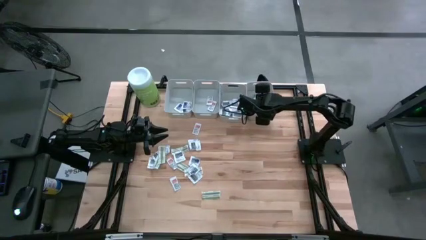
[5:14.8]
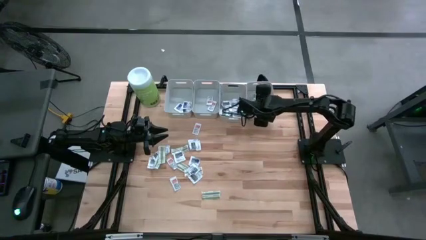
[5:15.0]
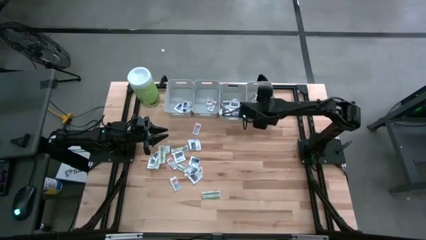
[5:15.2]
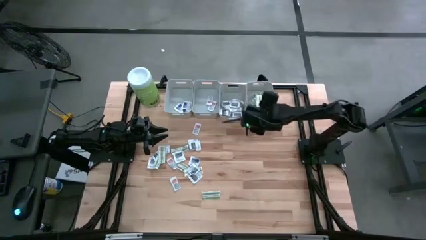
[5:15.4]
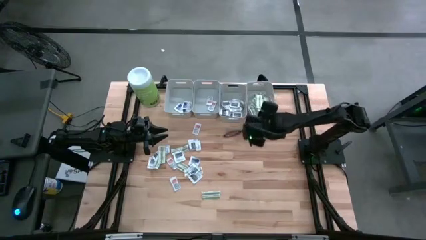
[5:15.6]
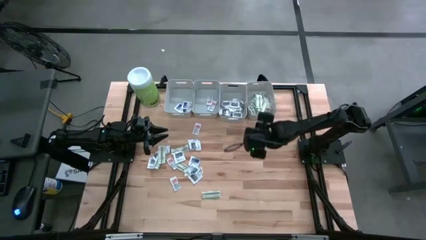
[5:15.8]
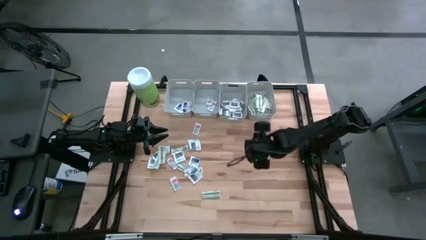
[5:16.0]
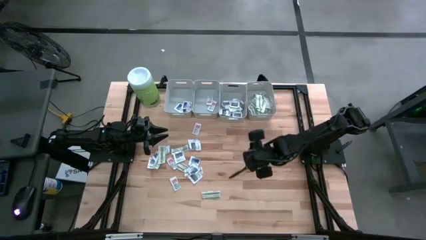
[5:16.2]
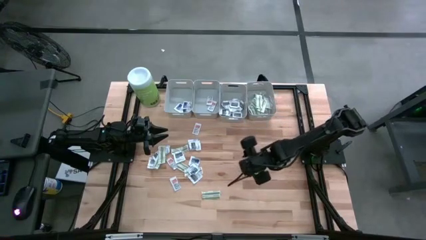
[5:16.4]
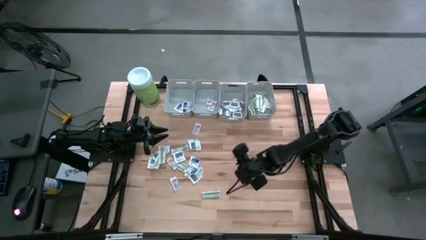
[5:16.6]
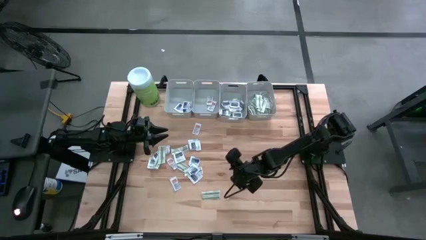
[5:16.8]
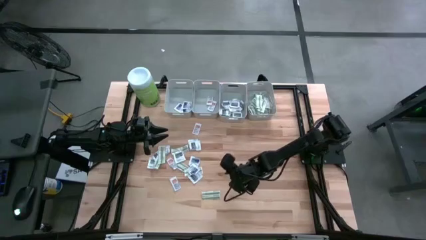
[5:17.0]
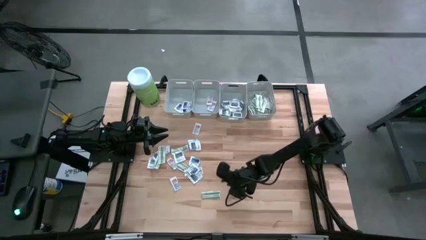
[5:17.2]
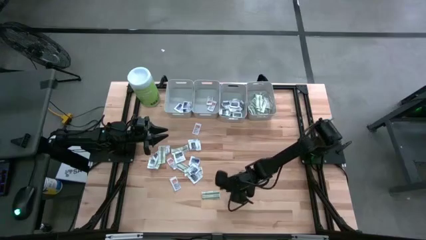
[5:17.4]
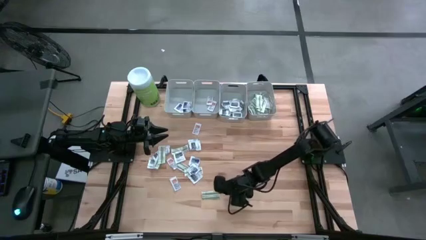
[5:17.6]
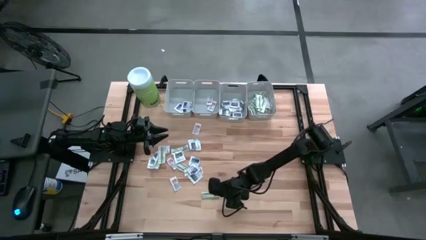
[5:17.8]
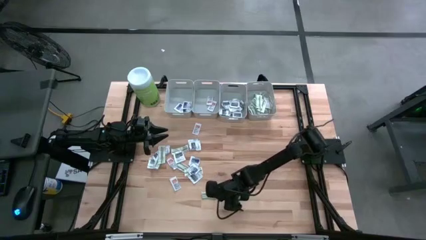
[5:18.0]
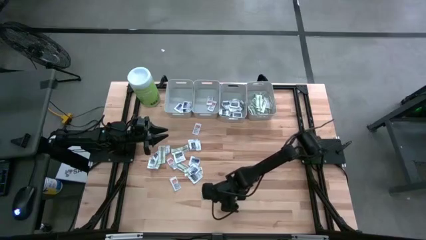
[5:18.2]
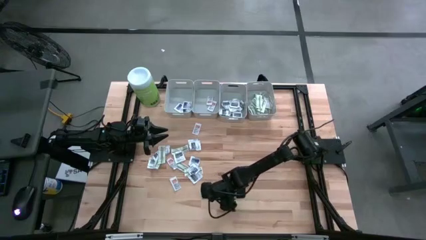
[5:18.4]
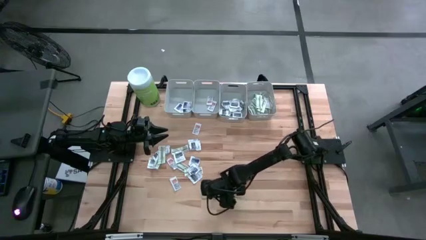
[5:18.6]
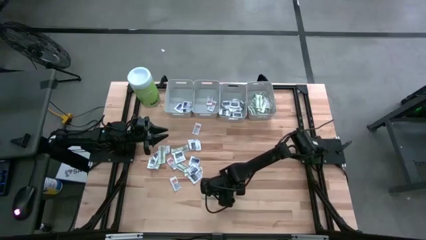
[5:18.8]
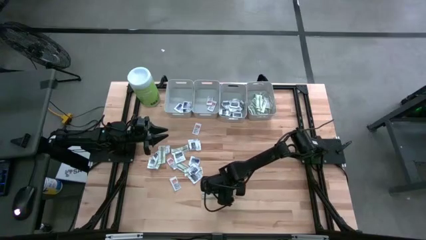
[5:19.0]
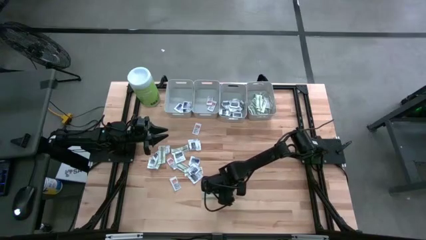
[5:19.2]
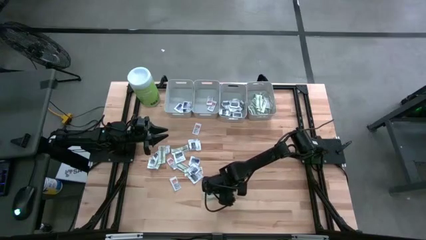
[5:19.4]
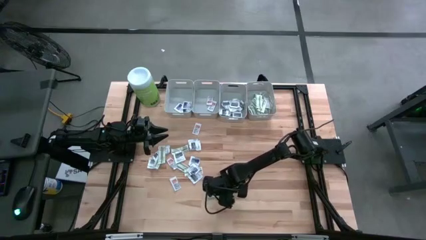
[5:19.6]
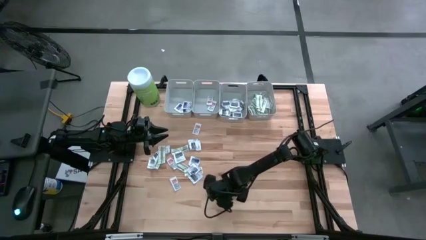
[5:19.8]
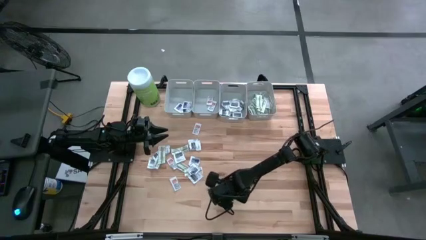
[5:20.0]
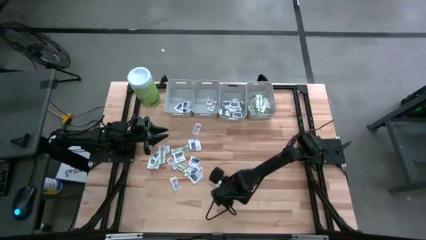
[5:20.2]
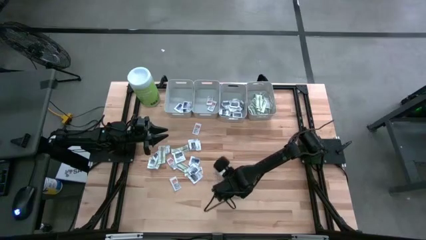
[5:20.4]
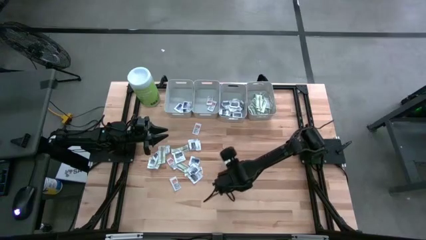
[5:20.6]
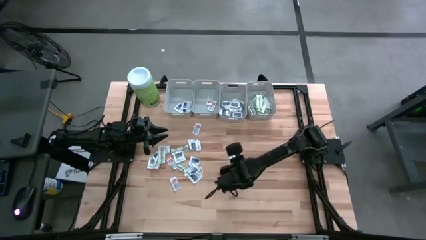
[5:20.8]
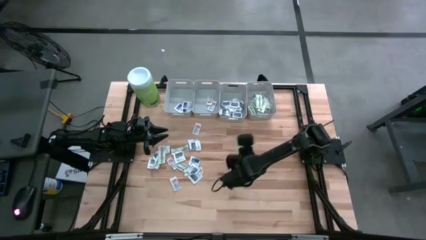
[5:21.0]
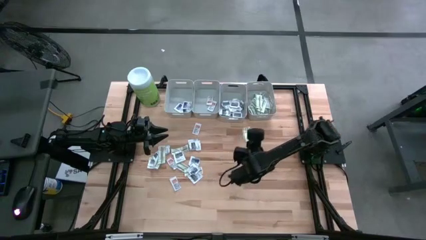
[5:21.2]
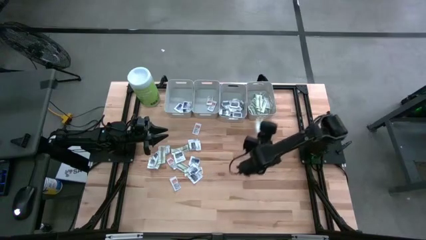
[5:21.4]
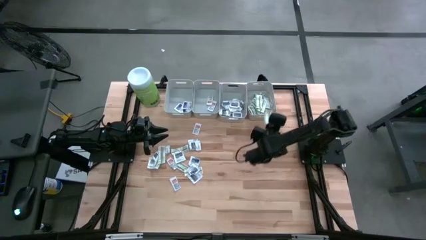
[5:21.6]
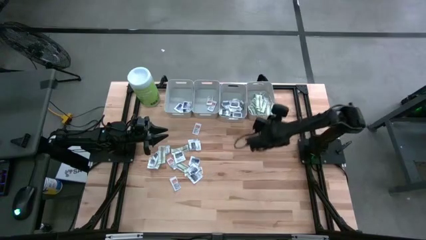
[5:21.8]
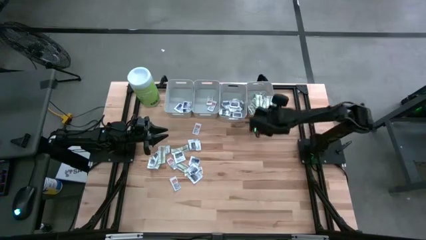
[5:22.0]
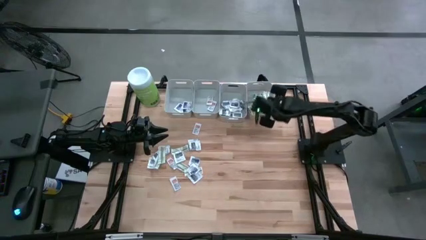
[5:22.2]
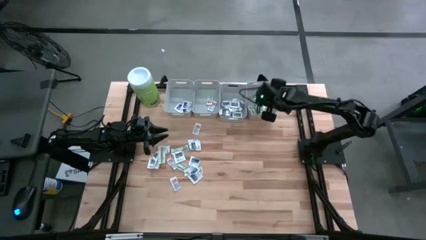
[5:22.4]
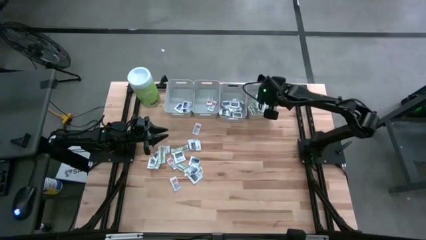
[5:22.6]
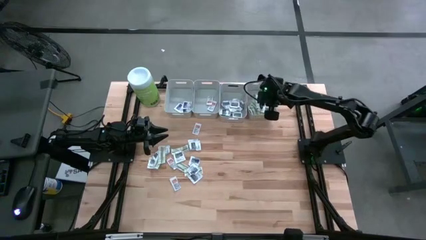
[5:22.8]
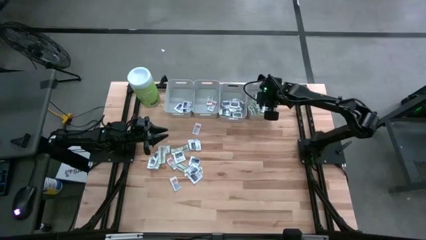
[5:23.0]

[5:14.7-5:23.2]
Task: Pick & Place First Aid Supplies
Put the bandage into the right gray bin

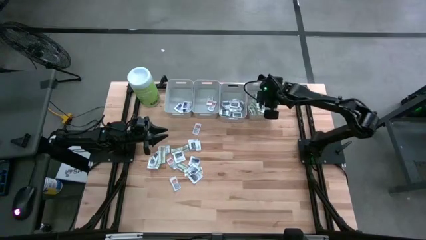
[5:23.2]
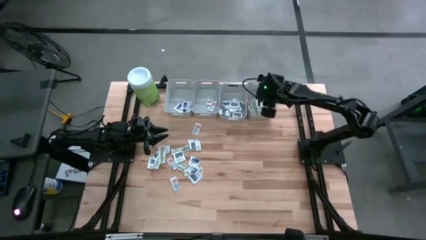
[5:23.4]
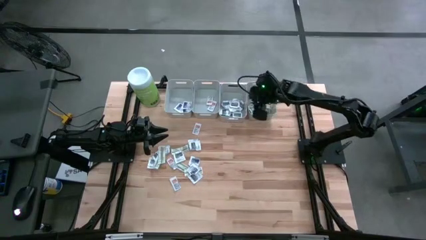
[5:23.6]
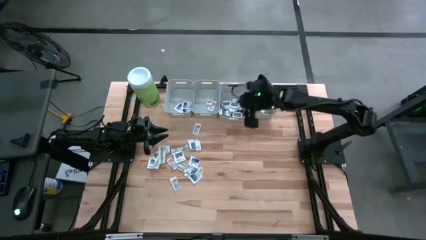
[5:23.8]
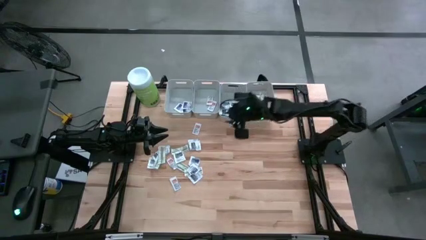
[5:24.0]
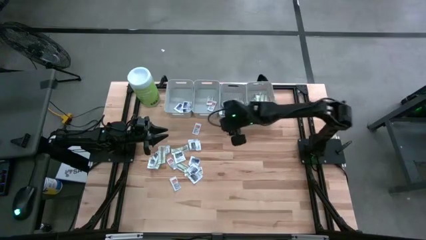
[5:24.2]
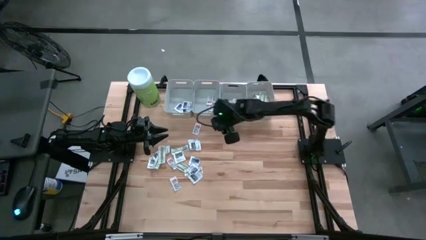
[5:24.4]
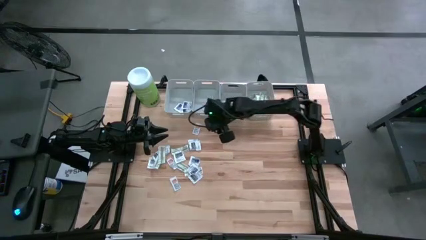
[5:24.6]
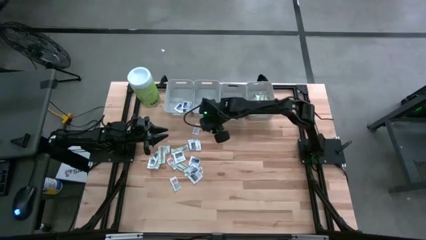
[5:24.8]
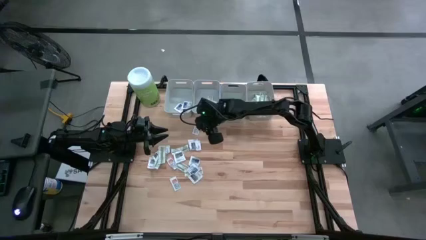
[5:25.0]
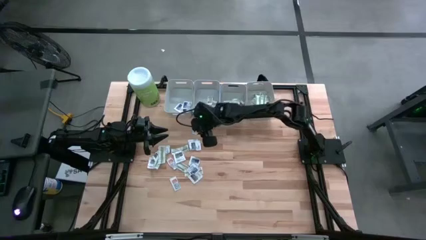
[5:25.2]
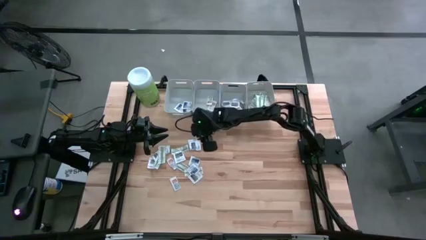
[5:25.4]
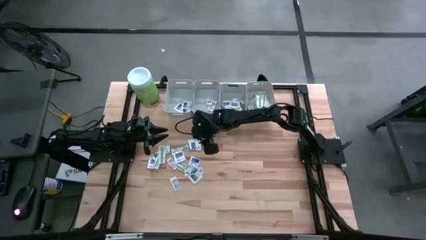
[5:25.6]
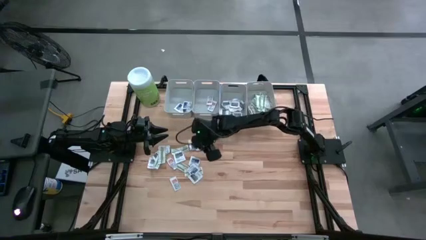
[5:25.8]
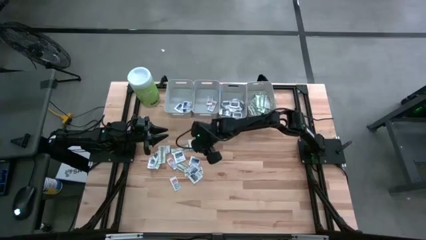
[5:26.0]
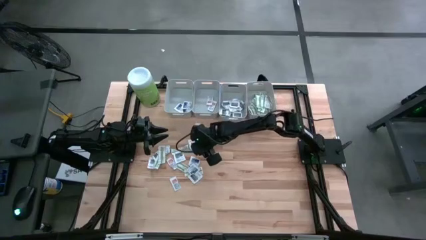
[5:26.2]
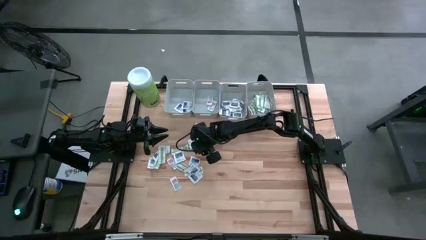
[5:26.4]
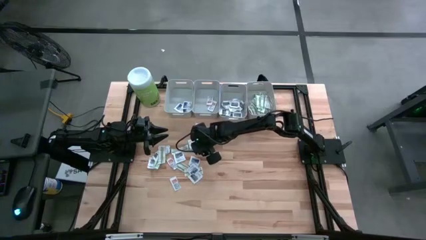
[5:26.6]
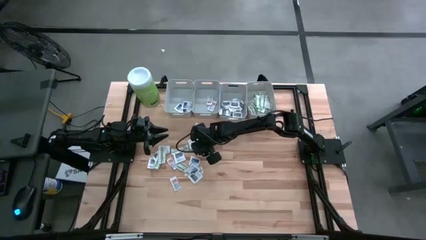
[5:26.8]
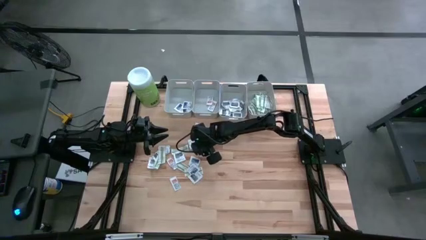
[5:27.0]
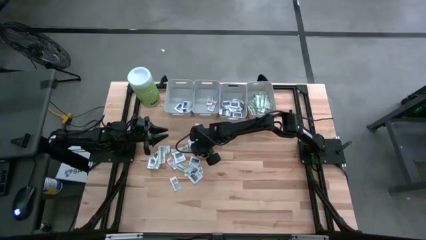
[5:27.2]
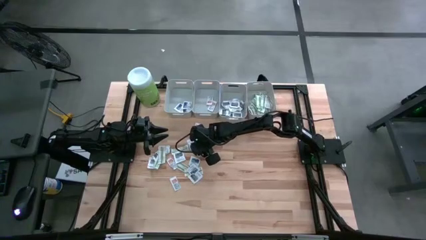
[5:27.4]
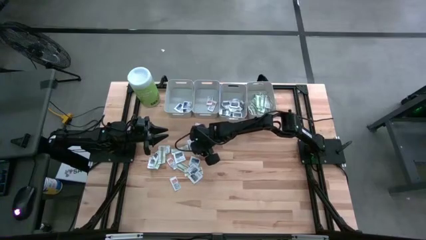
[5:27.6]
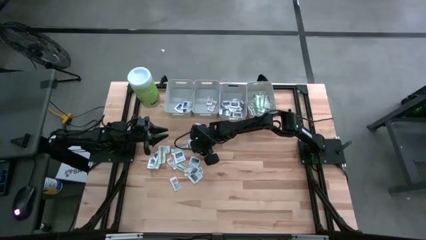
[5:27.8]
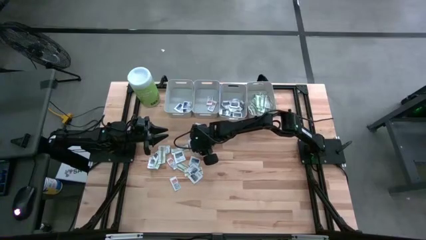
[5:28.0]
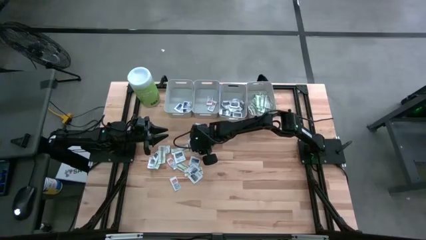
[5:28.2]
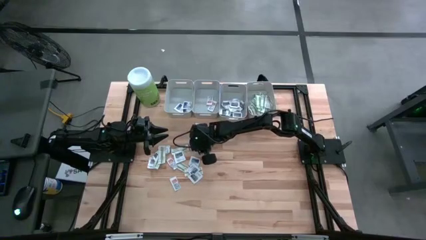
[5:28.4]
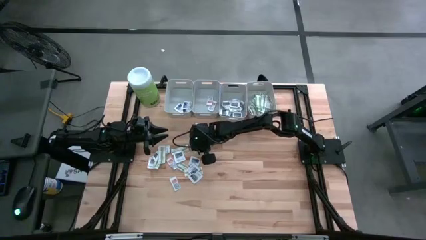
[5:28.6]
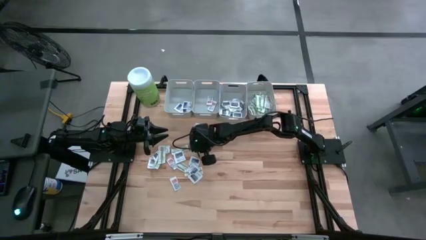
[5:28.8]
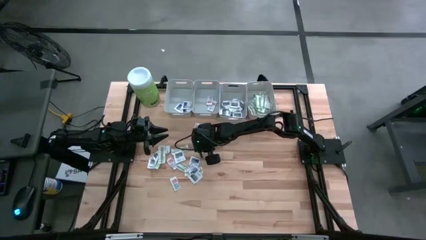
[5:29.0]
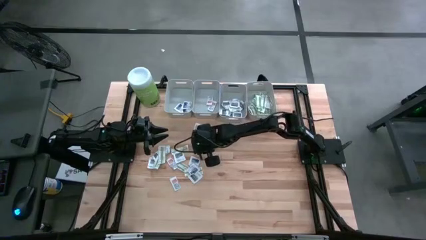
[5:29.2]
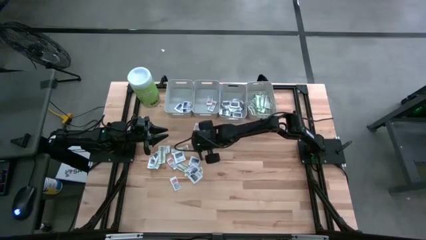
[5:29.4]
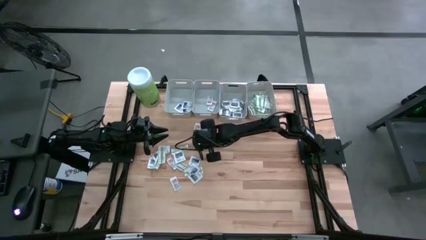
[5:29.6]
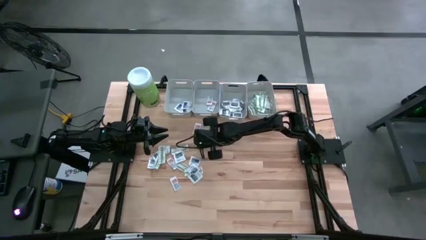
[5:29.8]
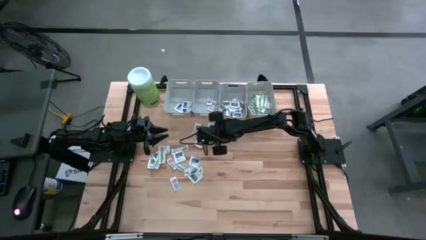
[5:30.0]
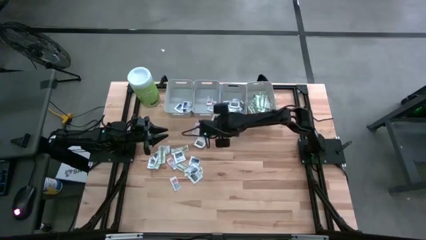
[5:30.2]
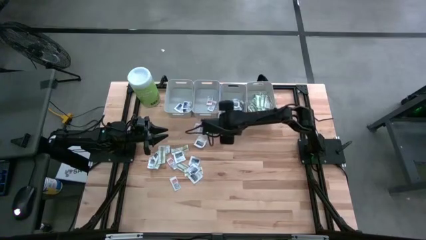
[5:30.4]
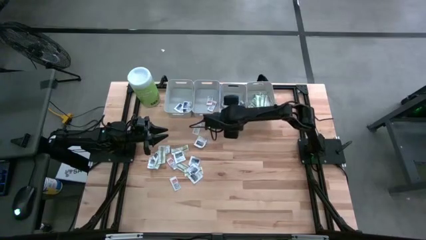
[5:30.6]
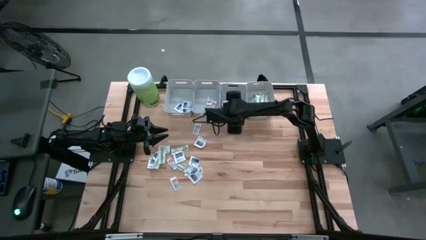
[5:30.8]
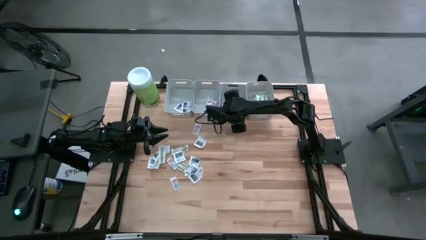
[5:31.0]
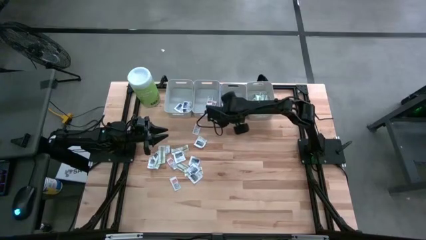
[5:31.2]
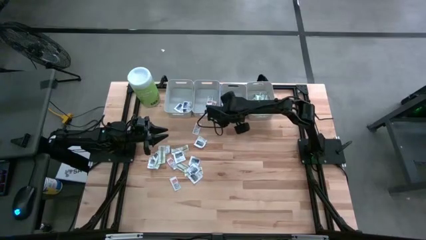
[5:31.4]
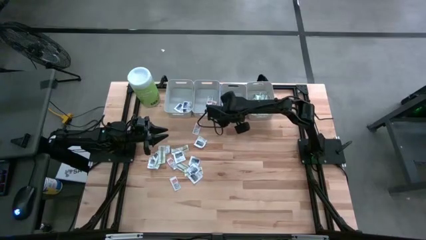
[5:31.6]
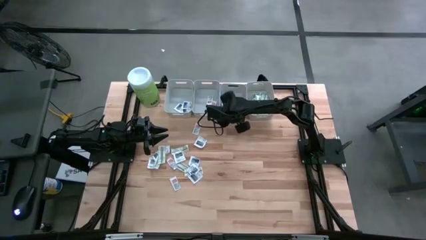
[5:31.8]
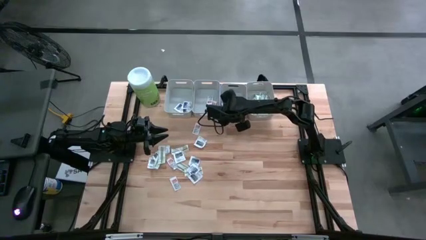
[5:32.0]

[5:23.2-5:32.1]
Put the towelette pack into the middle right gray bin
